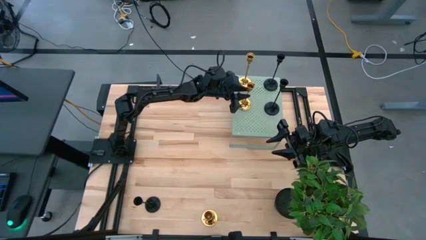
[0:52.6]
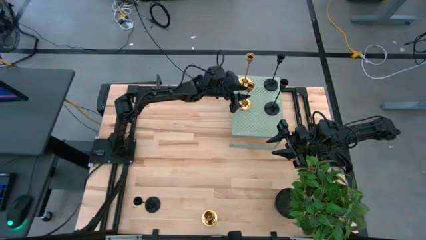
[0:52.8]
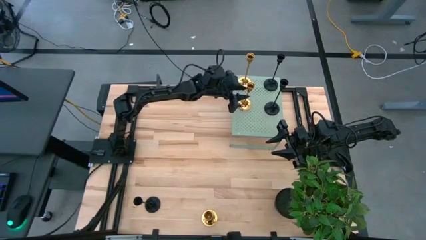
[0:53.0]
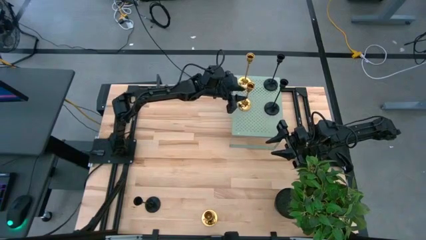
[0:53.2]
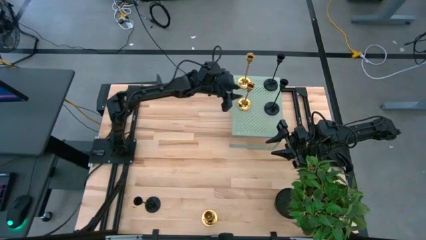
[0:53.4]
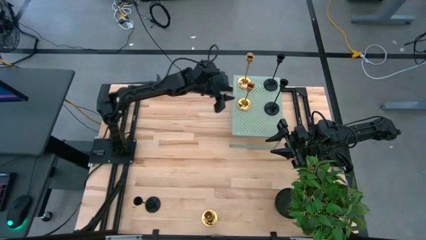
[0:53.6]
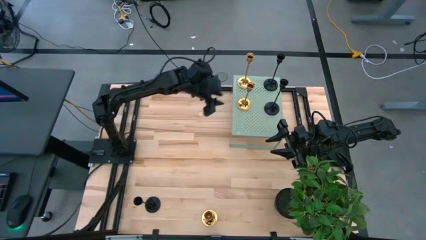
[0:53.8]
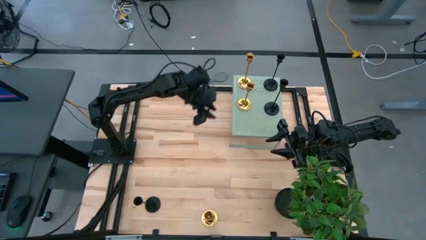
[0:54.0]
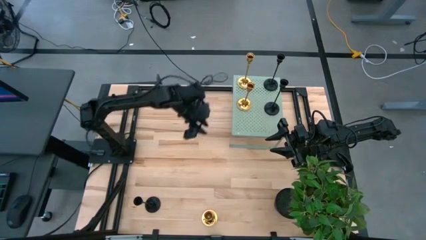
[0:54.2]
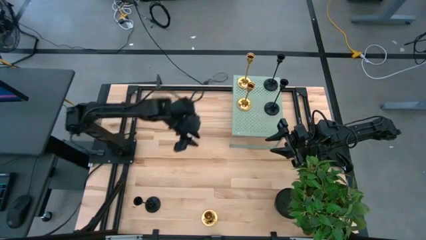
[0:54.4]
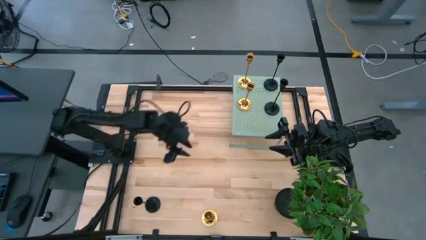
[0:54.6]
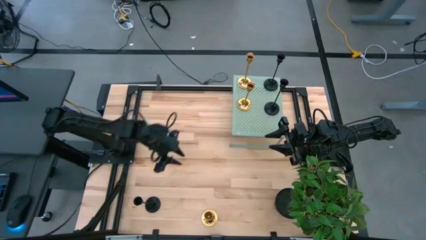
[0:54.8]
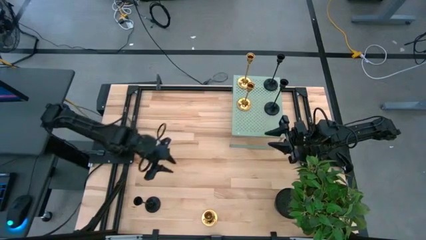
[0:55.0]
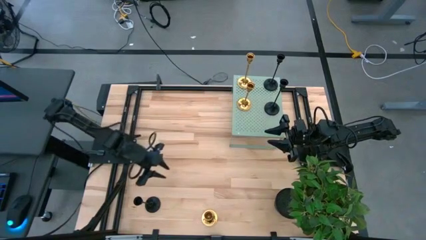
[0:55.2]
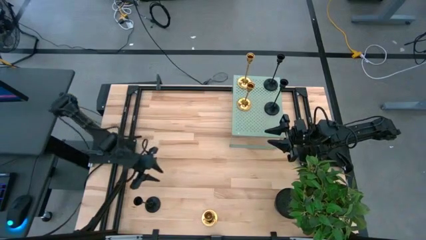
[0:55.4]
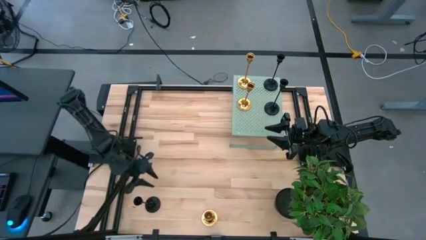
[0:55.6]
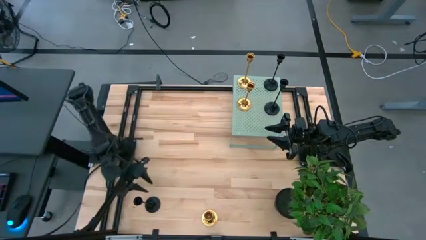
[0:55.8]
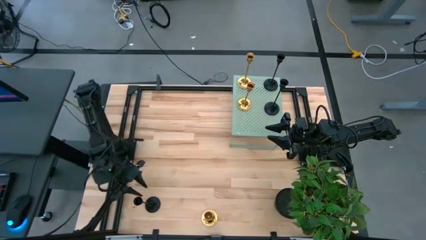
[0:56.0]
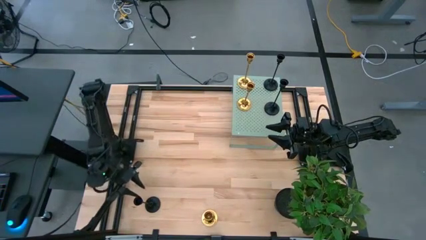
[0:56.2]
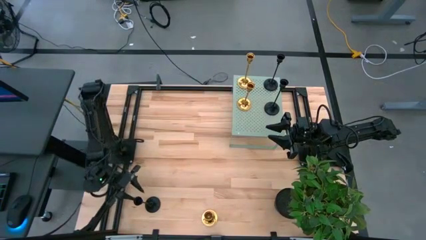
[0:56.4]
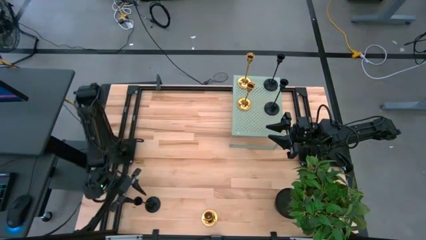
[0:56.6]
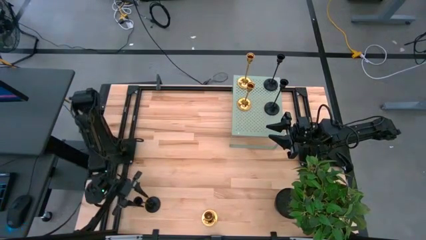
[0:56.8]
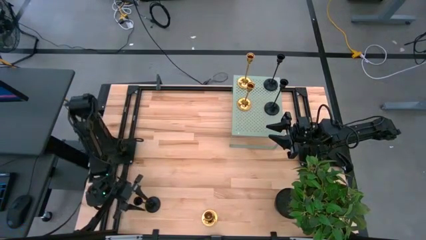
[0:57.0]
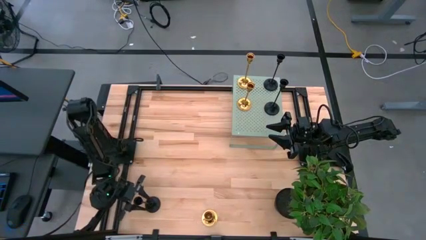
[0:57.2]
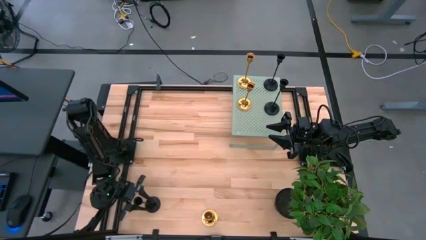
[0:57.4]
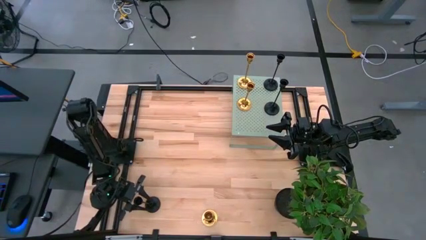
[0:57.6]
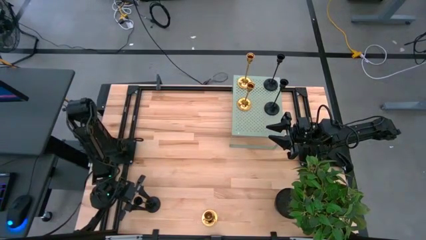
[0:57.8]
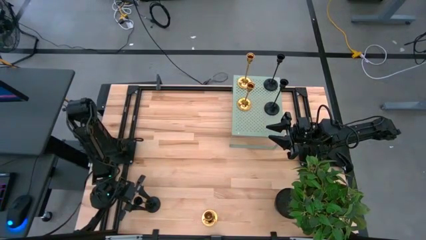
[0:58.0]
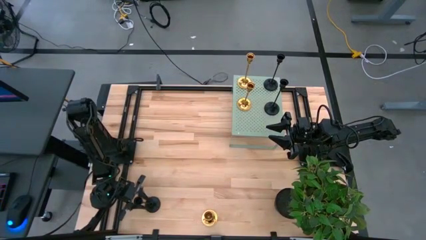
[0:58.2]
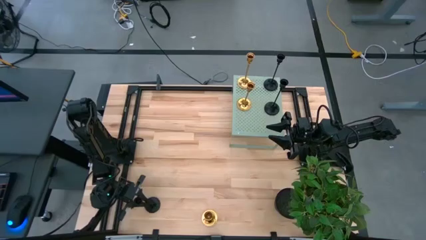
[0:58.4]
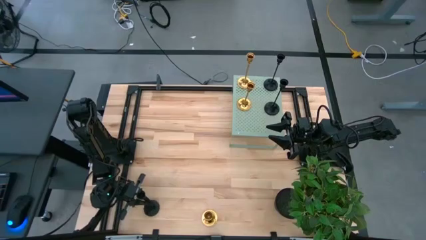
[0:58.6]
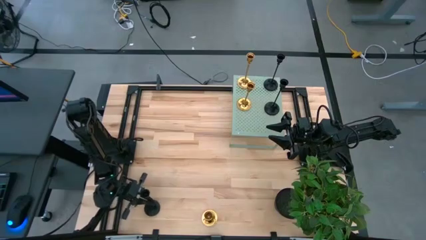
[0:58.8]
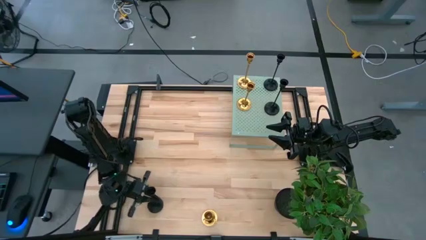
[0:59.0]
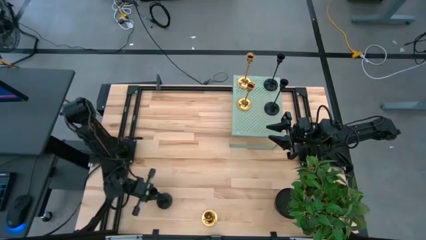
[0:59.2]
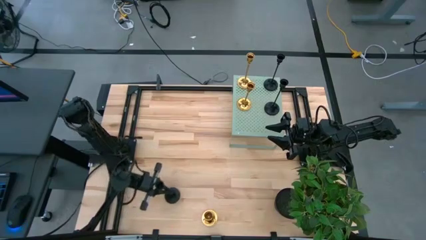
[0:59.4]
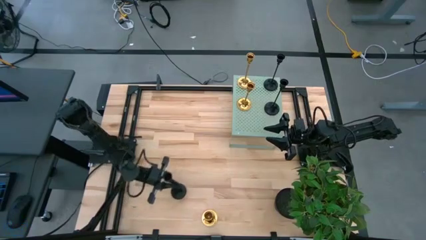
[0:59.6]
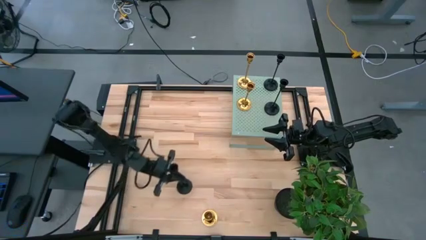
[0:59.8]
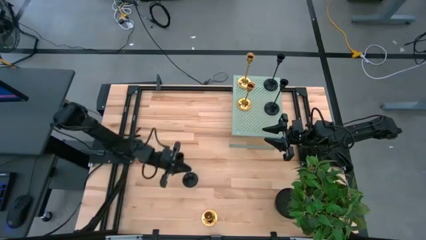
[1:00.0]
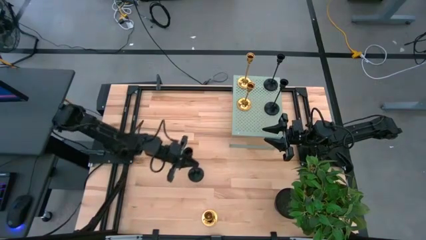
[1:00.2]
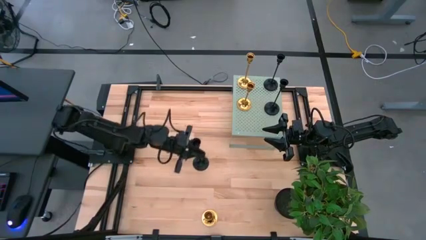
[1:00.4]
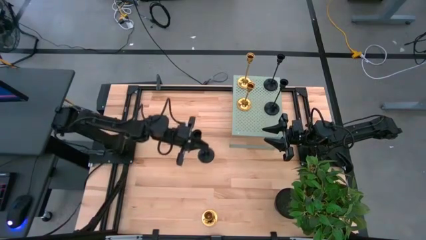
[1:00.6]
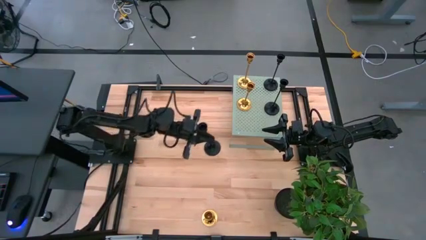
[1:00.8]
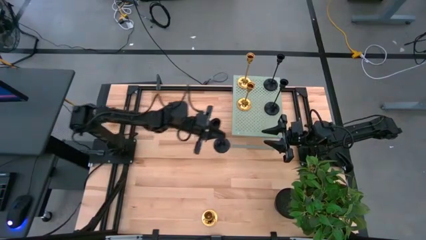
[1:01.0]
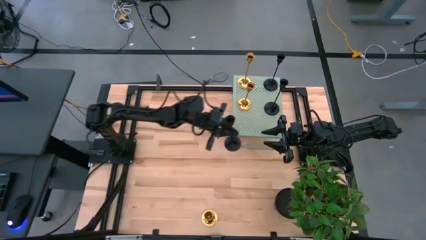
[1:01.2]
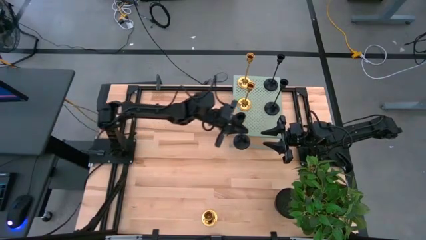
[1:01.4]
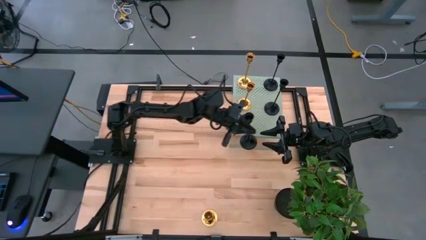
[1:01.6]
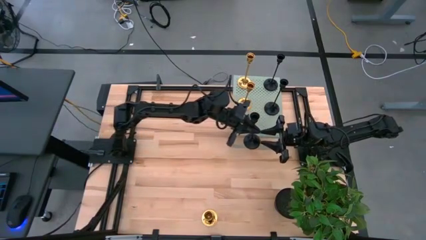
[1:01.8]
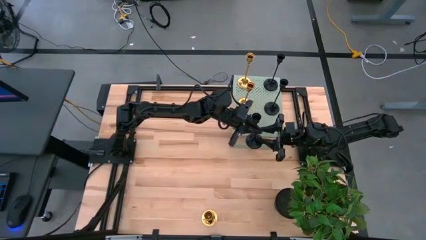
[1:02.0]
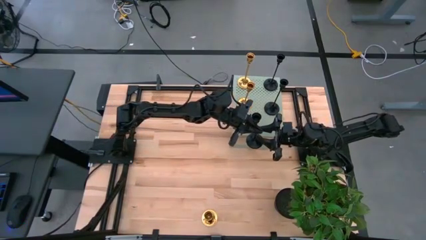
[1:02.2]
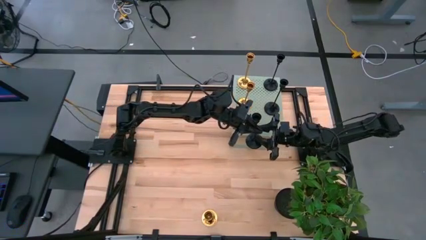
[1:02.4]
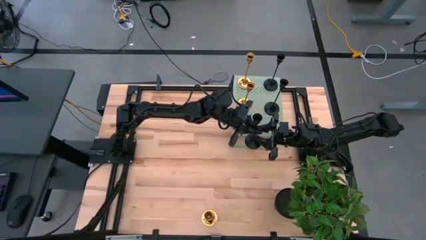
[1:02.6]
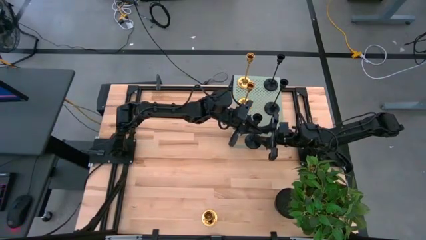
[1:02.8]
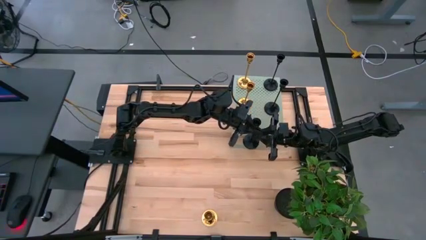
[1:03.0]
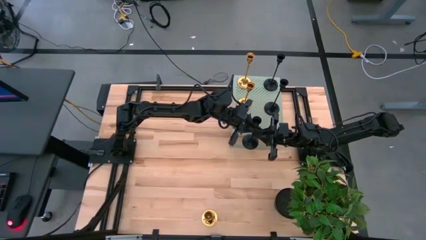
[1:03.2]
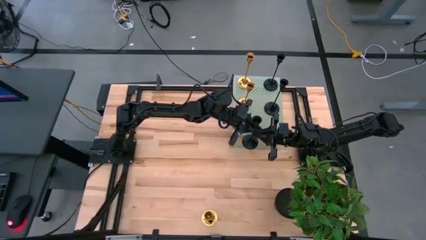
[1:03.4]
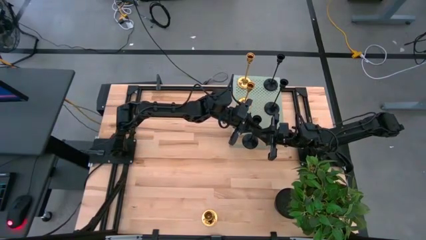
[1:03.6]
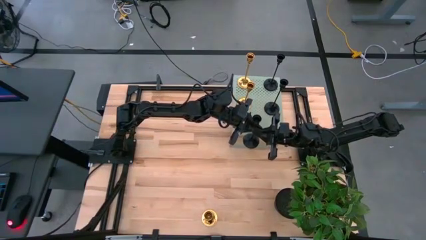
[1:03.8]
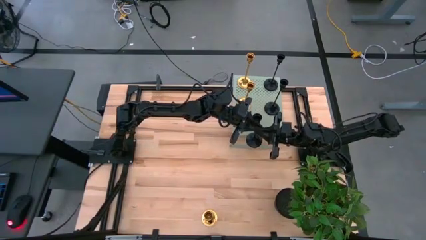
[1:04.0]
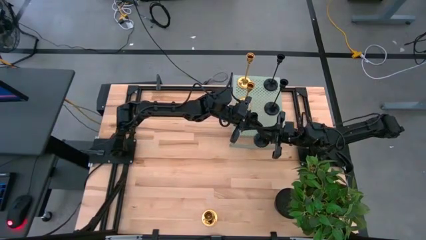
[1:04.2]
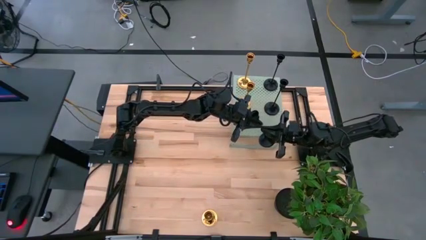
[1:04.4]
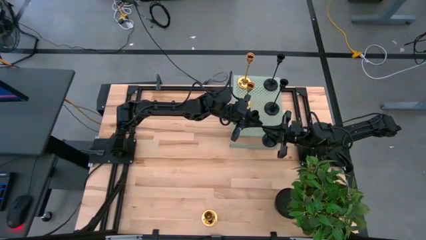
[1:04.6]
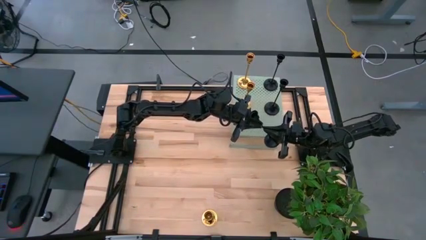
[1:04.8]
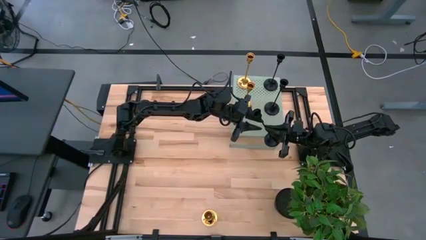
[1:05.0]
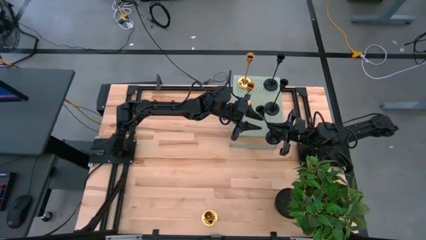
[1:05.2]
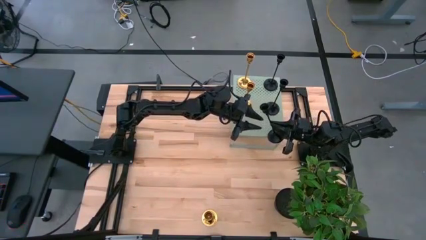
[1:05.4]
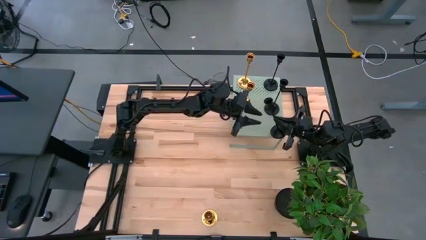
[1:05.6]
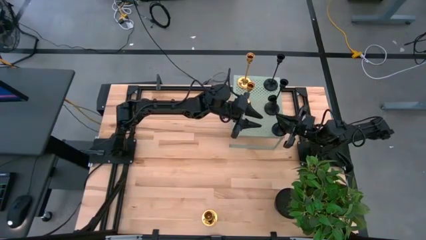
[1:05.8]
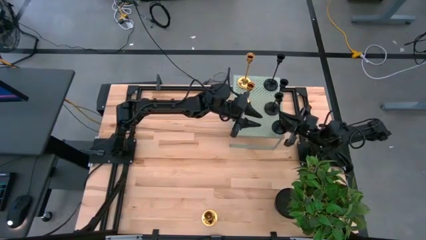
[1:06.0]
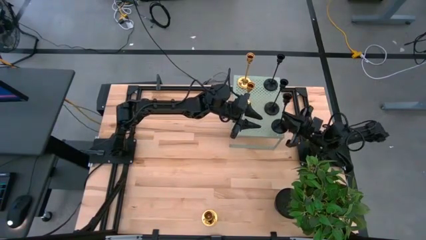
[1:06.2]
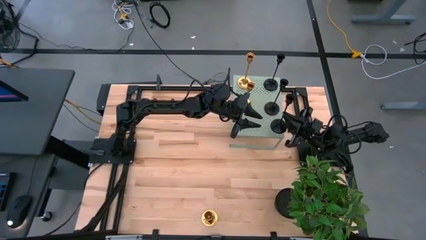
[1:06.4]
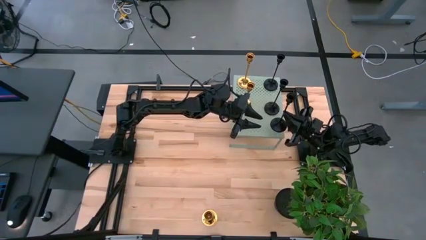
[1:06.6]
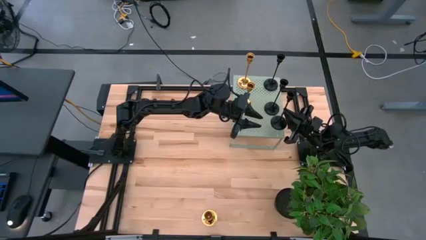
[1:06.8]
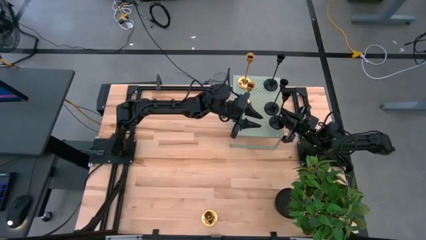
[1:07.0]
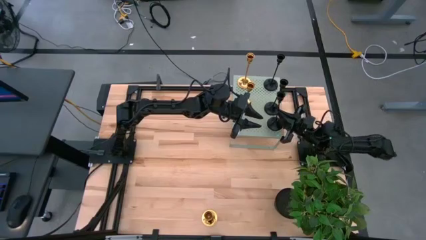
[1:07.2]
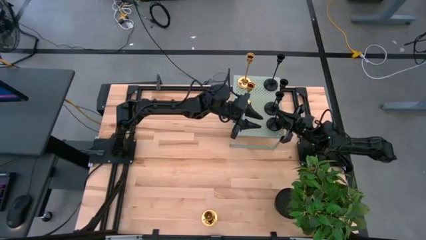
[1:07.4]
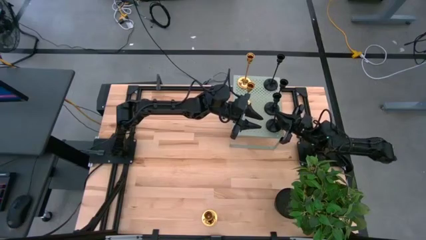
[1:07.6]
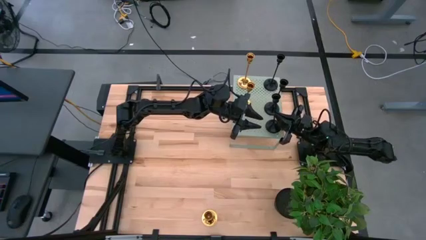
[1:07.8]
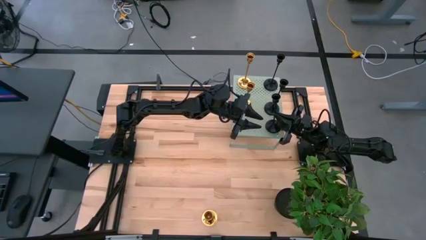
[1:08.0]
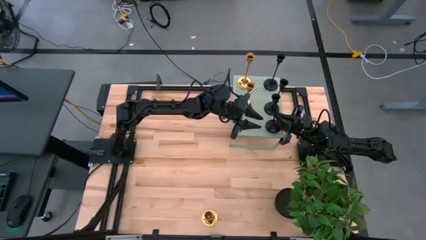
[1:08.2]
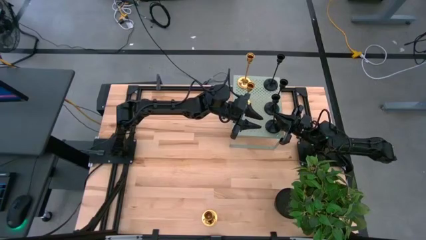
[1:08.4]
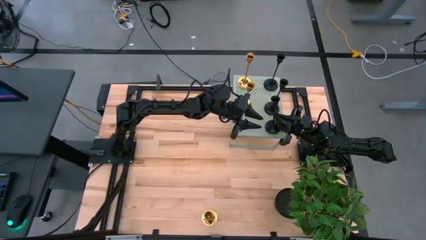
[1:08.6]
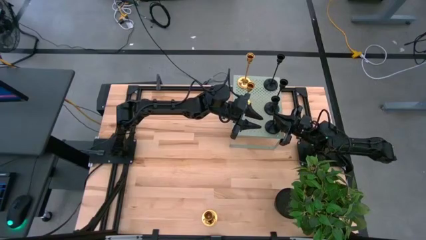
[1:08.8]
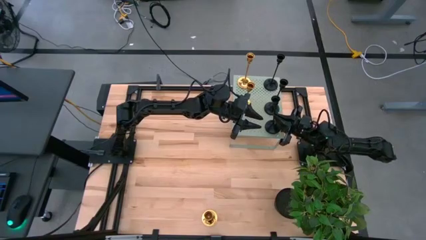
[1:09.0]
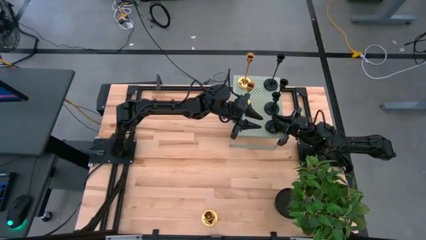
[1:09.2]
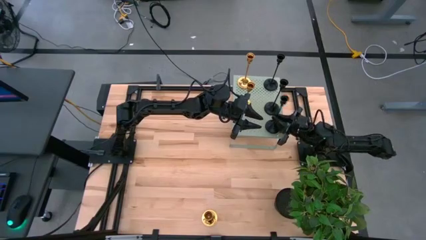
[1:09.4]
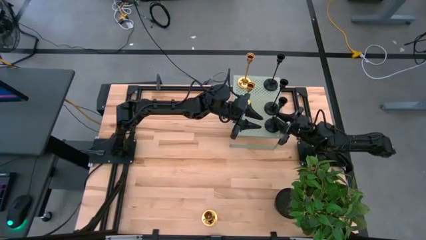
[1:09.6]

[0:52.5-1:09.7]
Task: Pick & Place candle stick holders
Put the black candle holder on top of the shelf aligned with the other black candle holders
